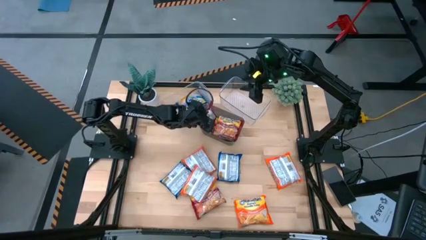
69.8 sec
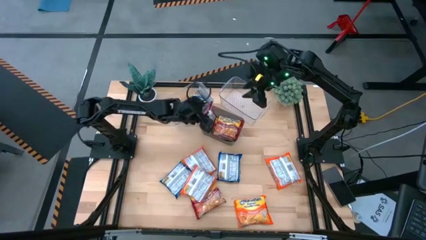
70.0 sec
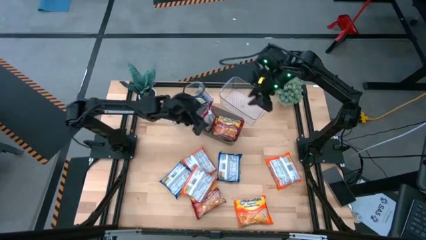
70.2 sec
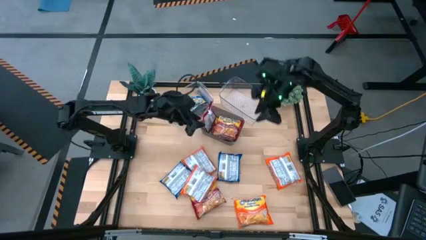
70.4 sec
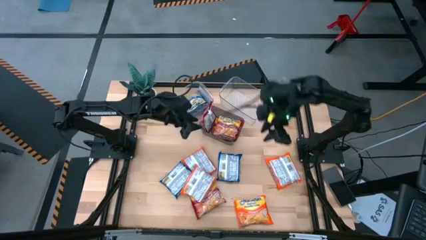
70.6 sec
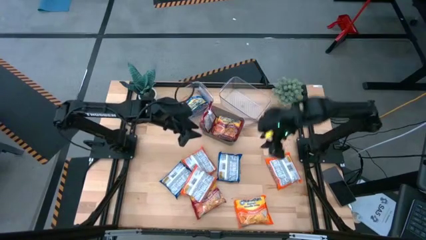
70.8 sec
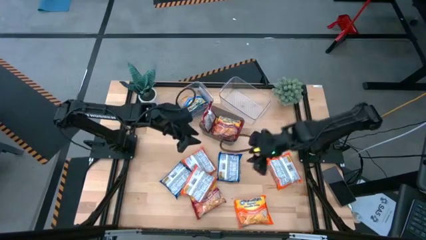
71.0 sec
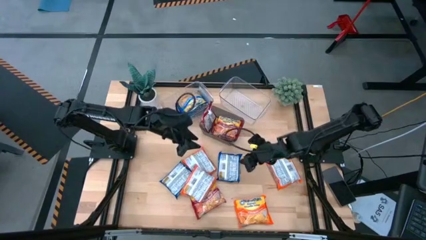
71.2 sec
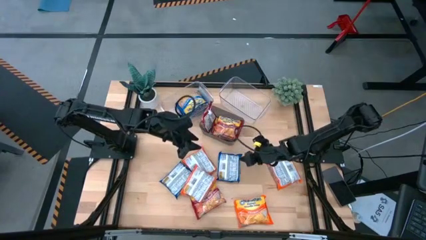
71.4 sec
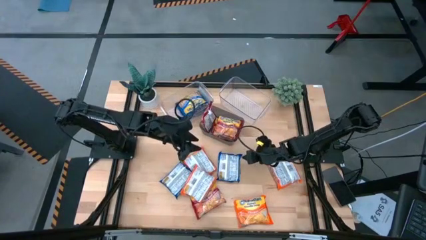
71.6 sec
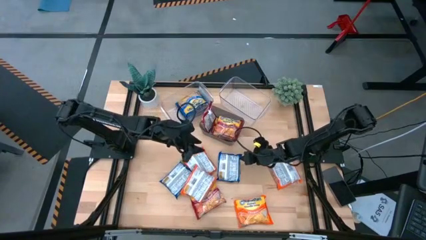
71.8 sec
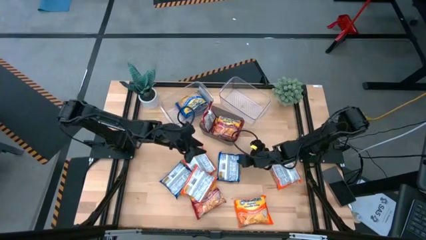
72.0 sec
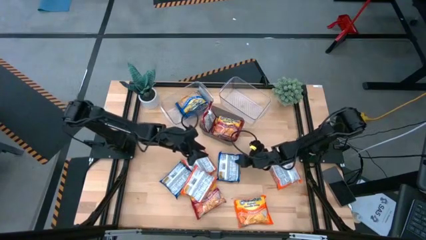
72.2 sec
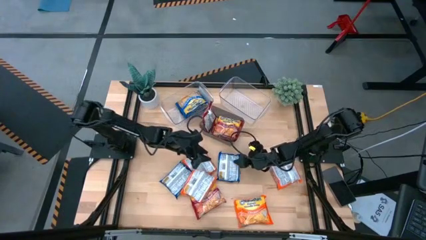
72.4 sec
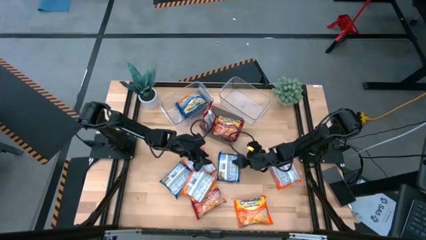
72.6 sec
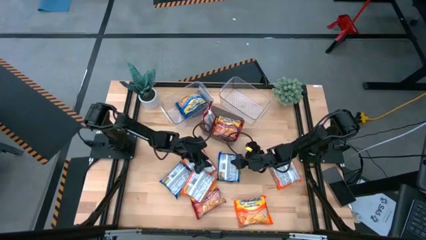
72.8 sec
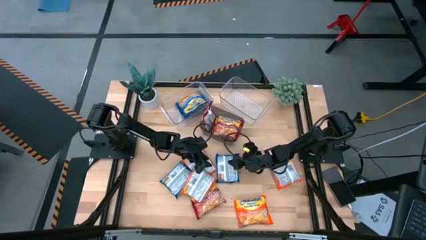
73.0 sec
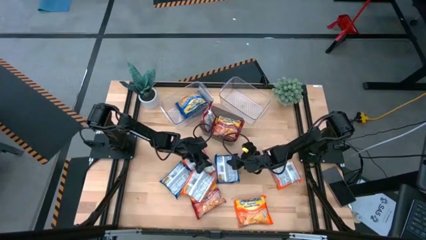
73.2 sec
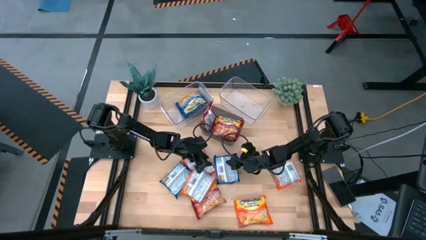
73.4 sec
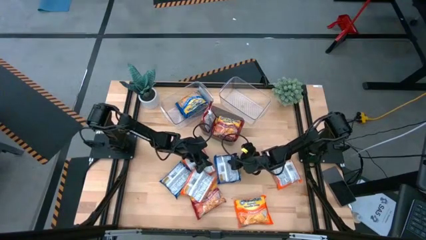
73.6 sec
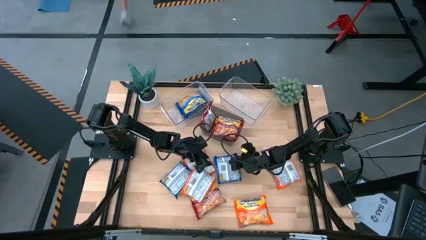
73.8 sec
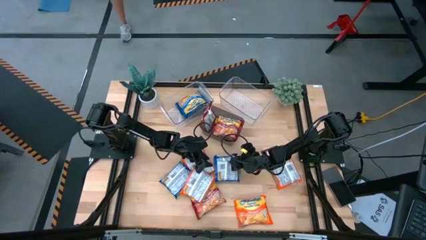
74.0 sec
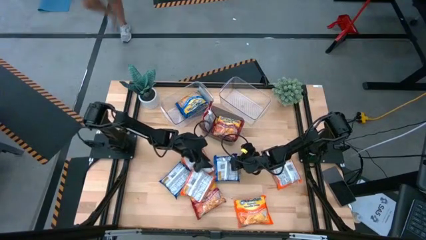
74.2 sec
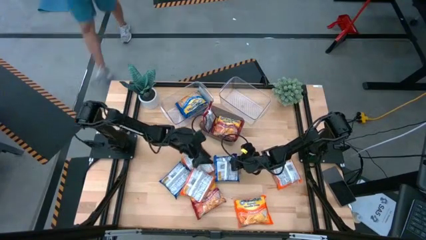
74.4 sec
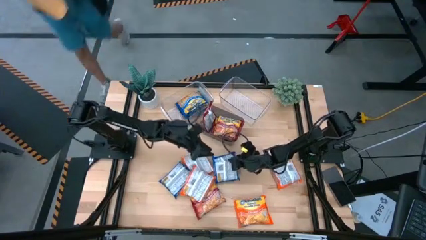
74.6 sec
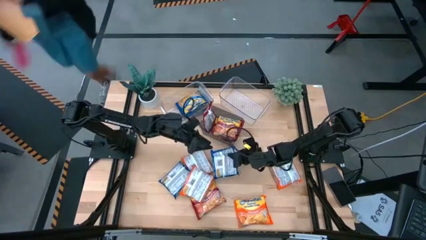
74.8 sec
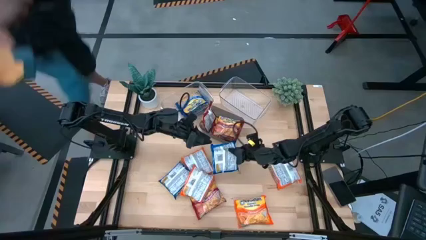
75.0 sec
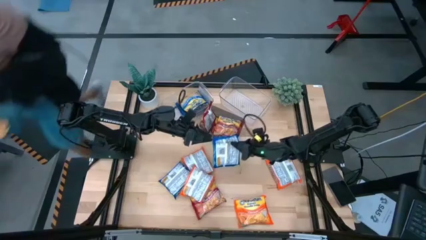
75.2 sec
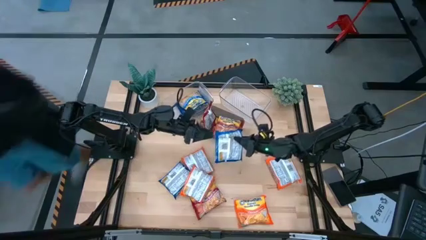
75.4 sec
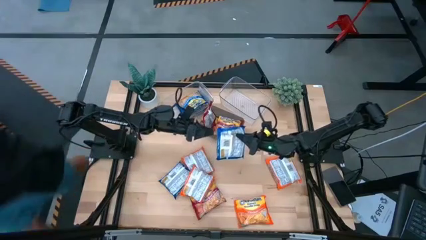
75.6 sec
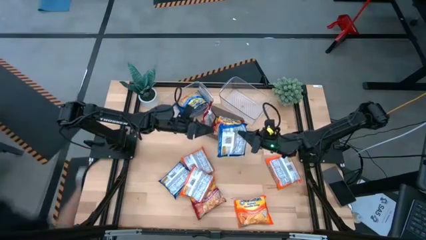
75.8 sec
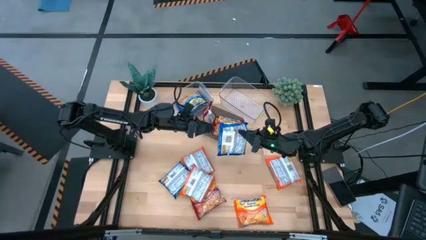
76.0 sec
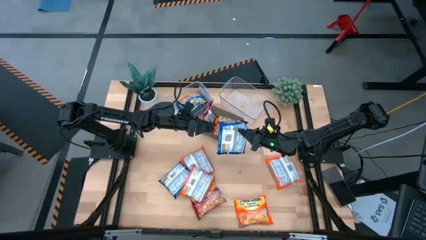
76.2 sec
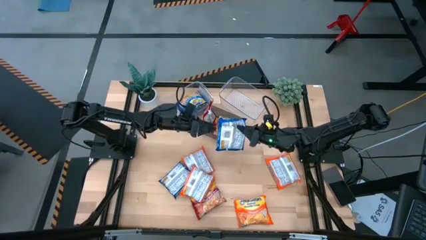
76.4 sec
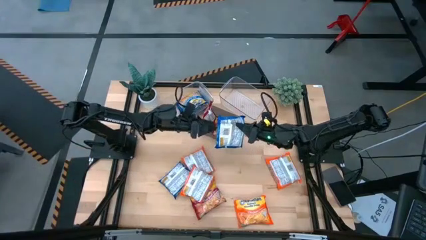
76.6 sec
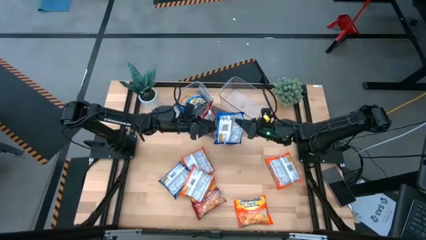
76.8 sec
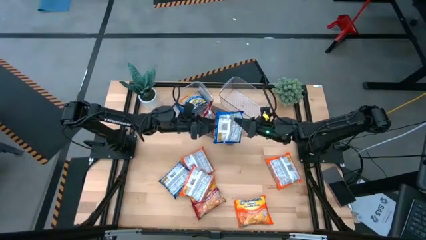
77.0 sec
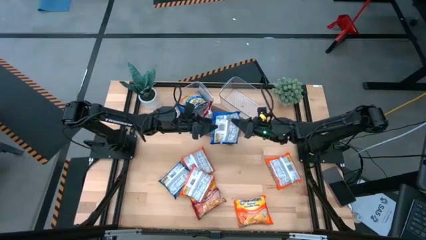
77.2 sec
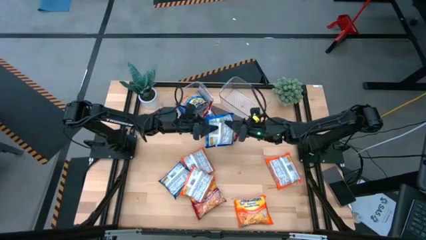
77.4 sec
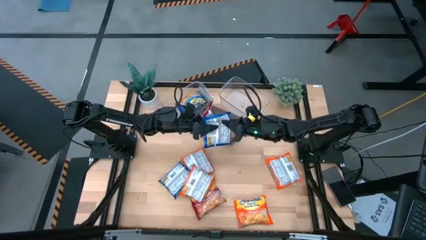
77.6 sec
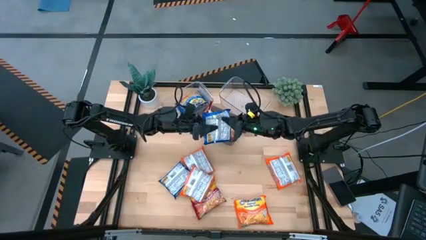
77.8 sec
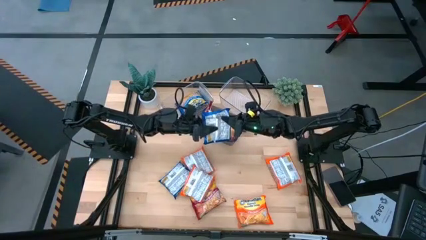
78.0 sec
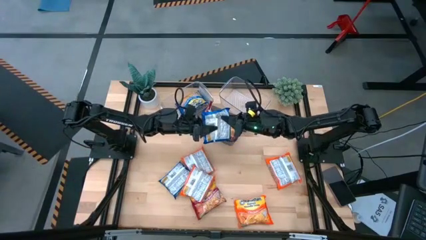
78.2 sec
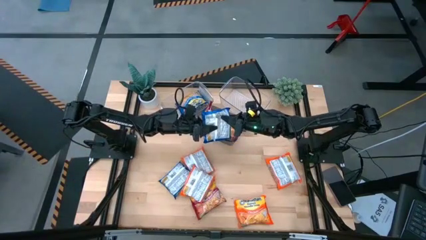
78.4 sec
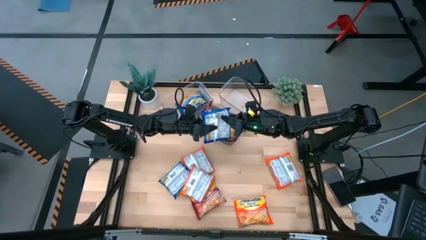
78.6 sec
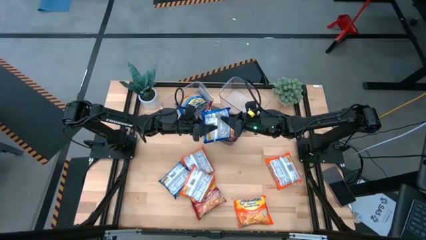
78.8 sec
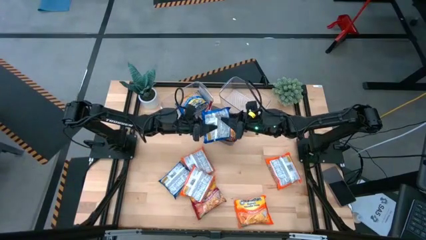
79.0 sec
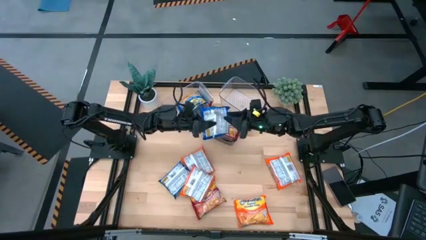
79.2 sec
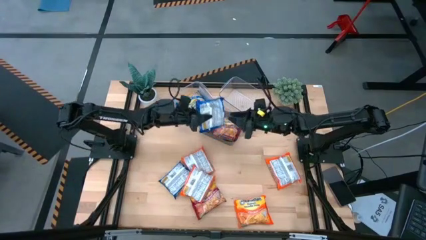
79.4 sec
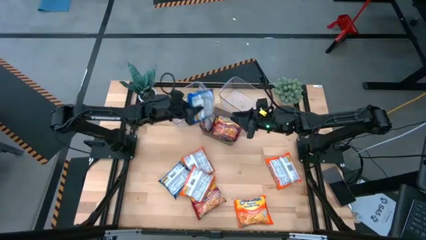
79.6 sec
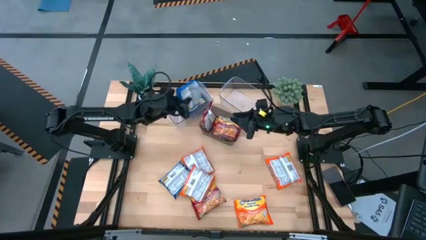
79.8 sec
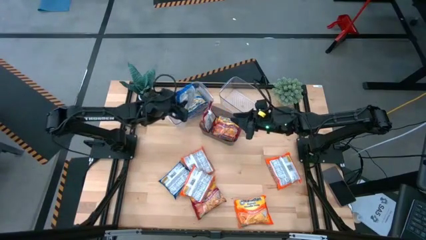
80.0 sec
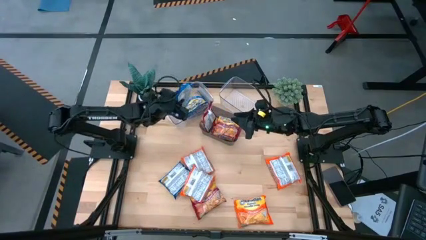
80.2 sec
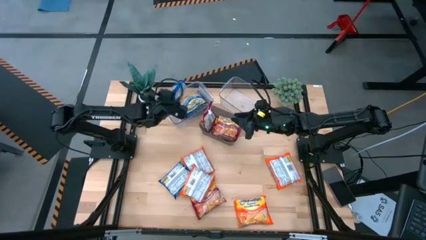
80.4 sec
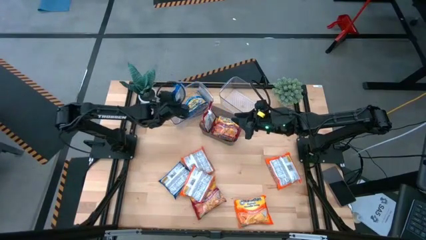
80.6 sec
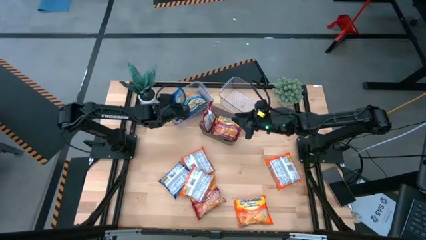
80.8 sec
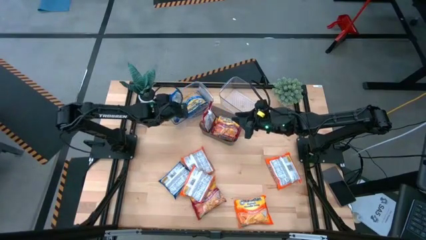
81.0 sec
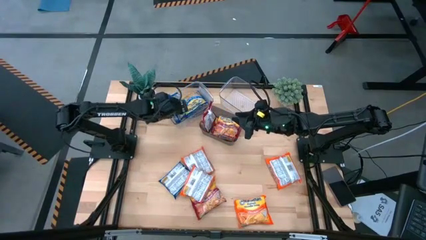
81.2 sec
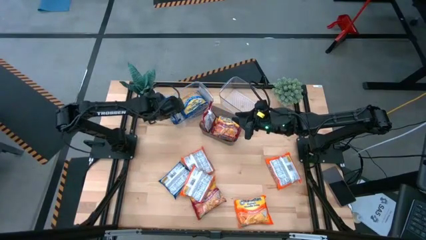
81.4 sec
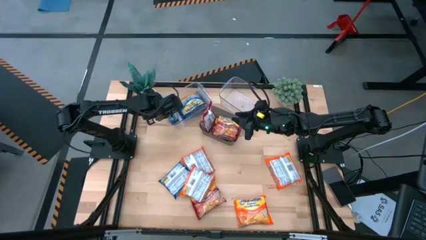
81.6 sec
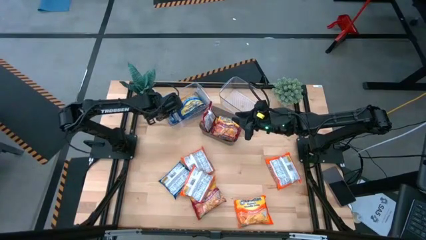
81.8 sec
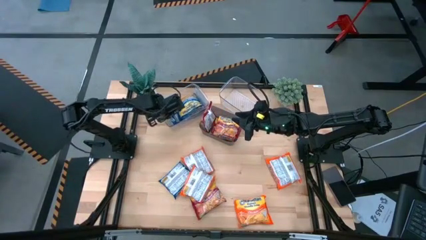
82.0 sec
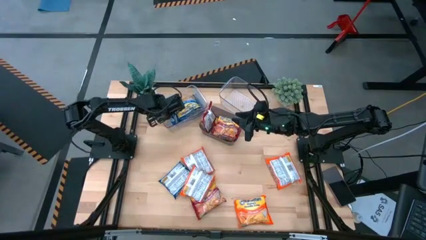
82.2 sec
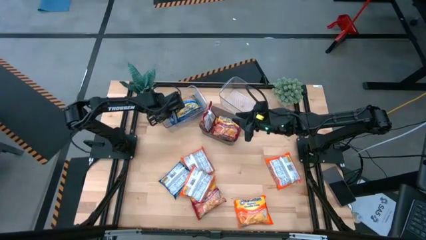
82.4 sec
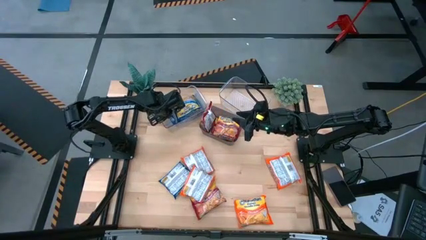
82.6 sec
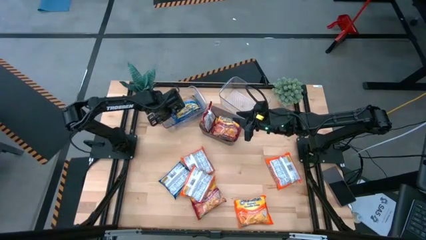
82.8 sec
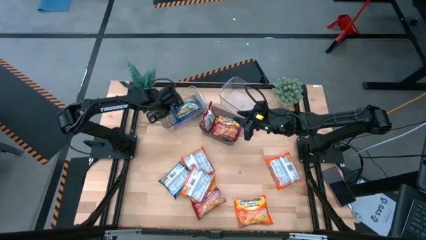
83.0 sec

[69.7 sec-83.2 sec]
Task: Sort Maruchan noodles
Put the blue noodle pack into the left transparent bin

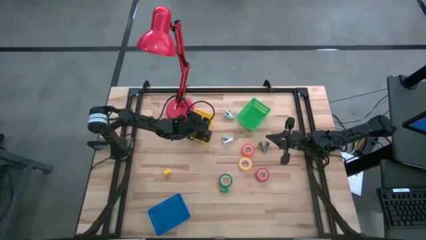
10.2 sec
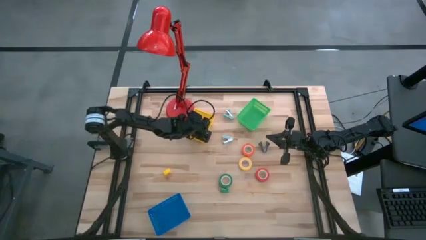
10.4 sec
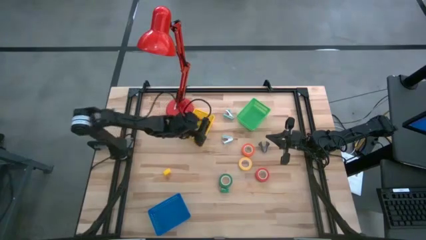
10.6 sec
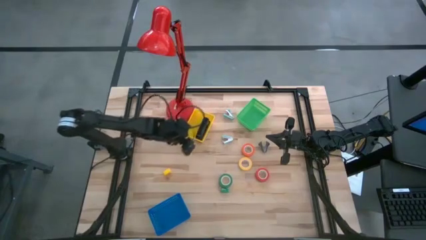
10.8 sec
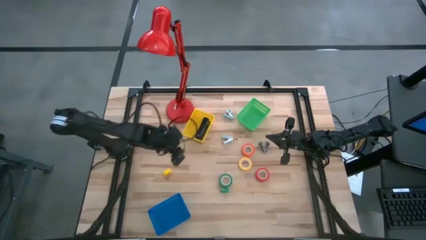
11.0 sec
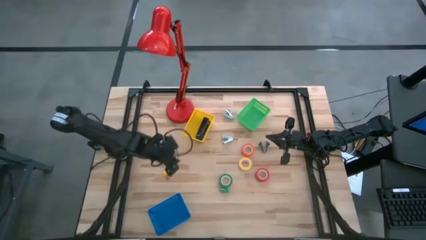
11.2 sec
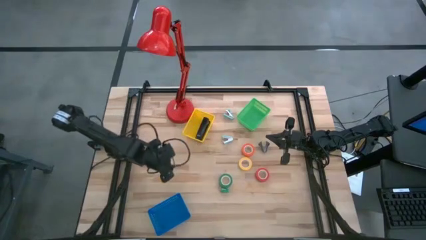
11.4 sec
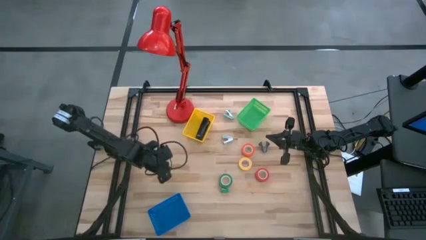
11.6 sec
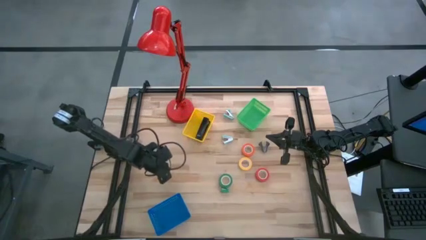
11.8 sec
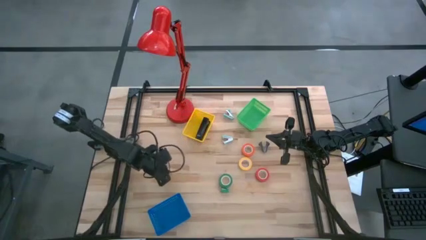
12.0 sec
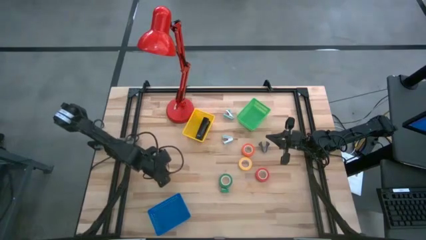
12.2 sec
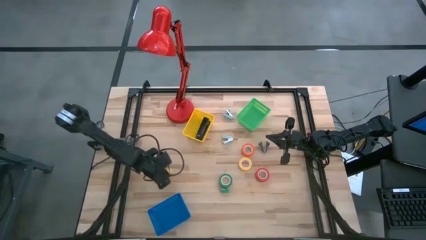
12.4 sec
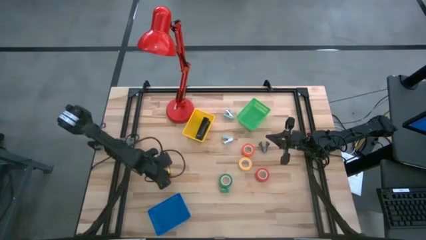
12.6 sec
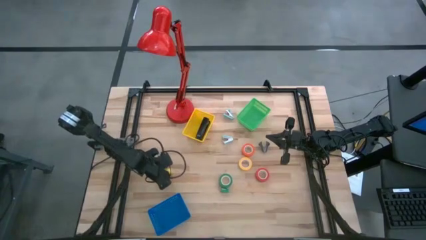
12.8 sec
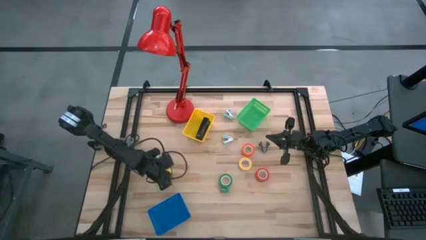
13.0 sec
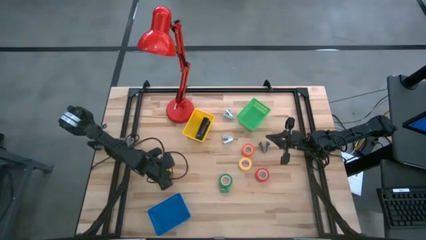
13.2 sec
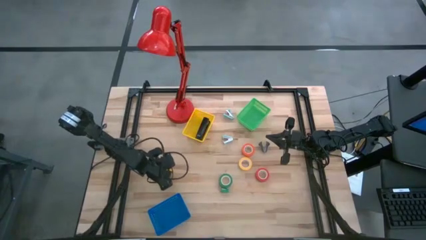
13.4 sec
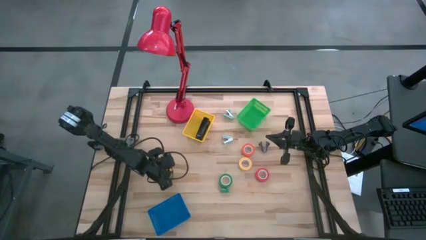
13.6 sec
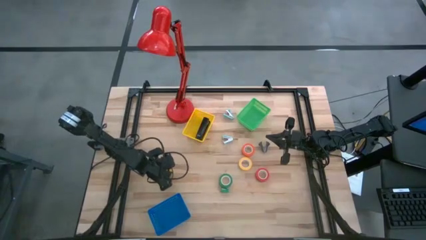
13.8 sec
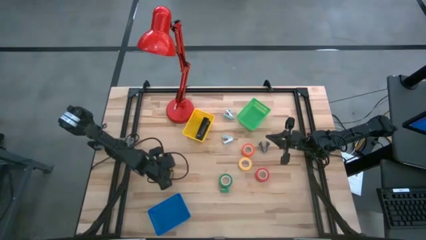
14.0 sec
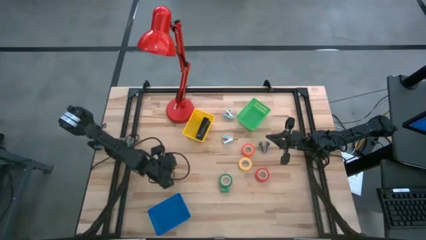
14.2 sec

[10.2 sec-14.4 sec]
Task: Pick and place Stapler, Stapler remover, tape
Put the yellow stapler into the yellow bin
